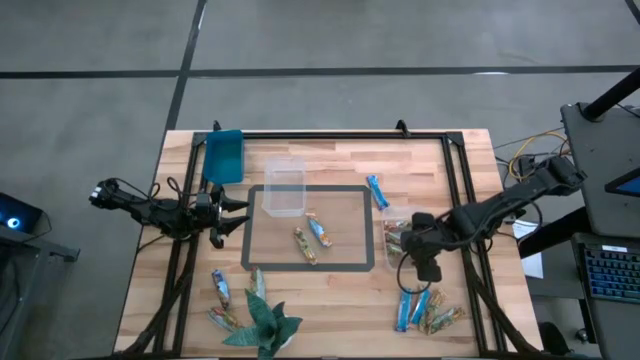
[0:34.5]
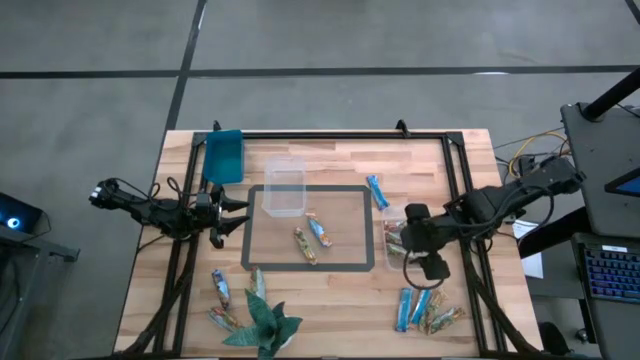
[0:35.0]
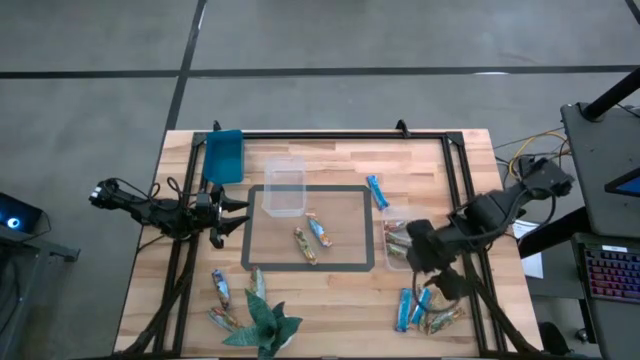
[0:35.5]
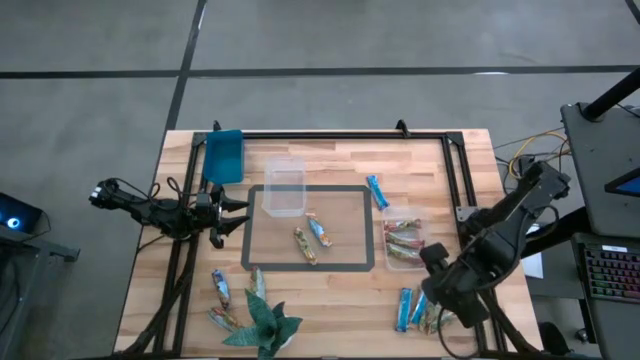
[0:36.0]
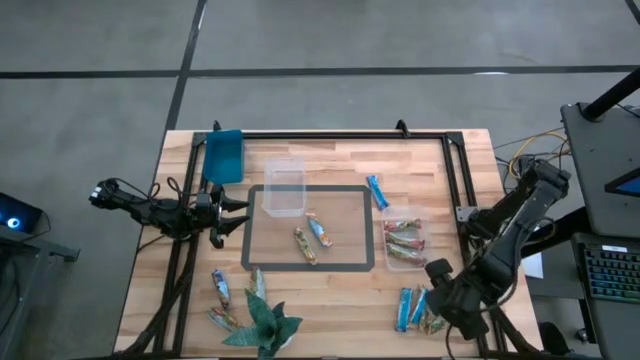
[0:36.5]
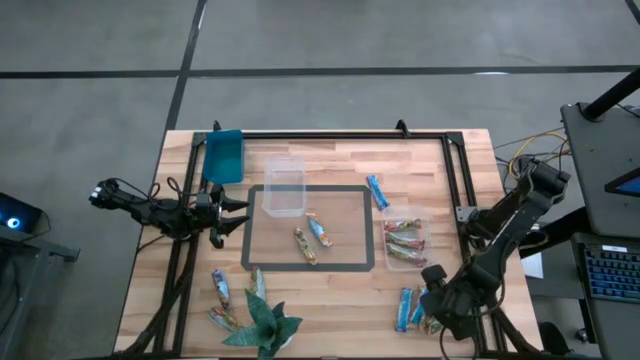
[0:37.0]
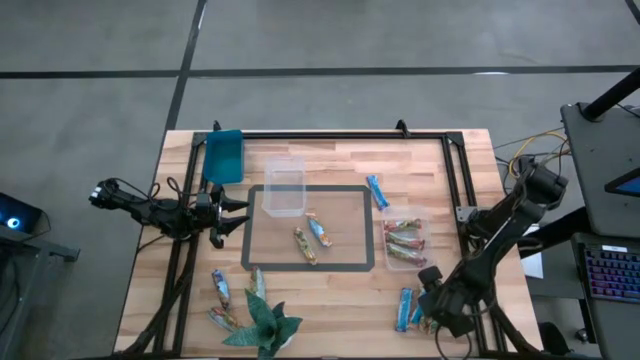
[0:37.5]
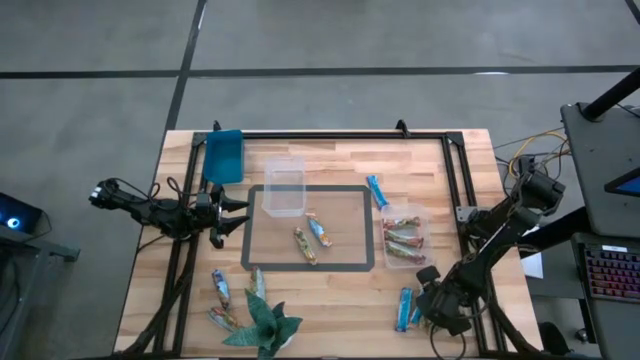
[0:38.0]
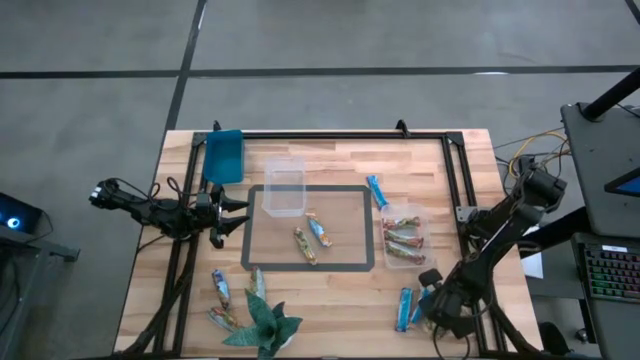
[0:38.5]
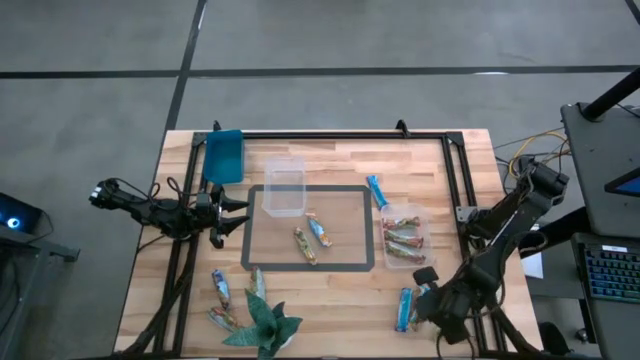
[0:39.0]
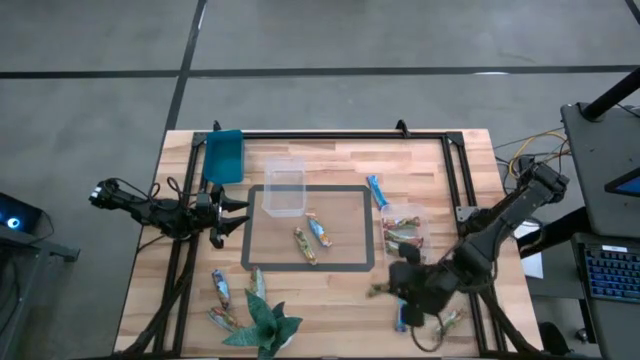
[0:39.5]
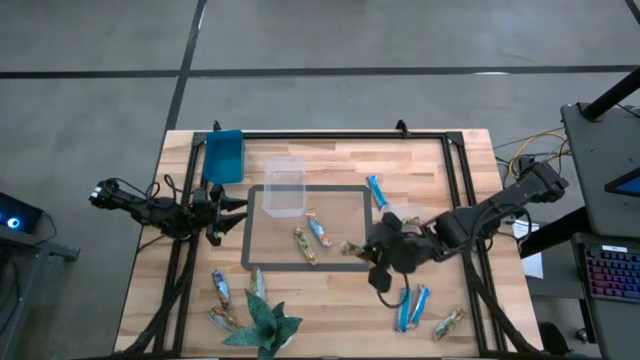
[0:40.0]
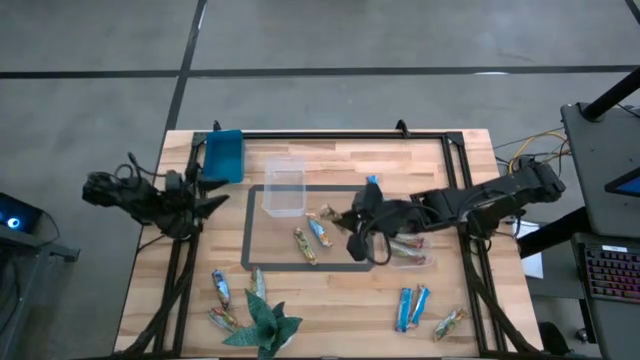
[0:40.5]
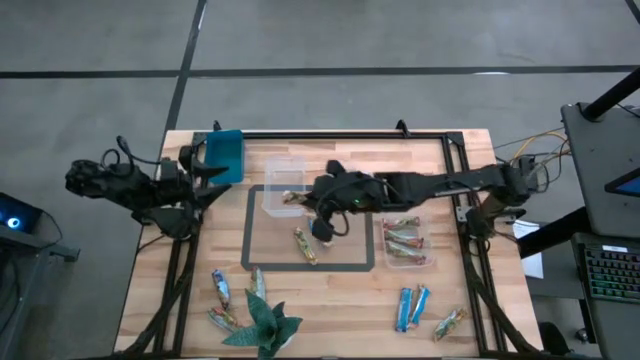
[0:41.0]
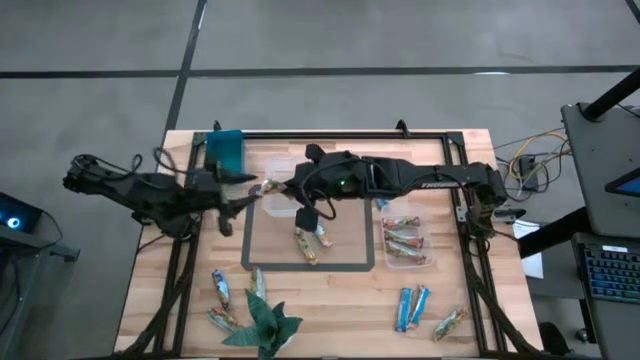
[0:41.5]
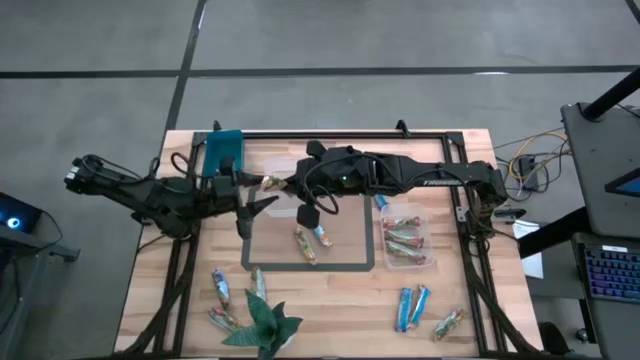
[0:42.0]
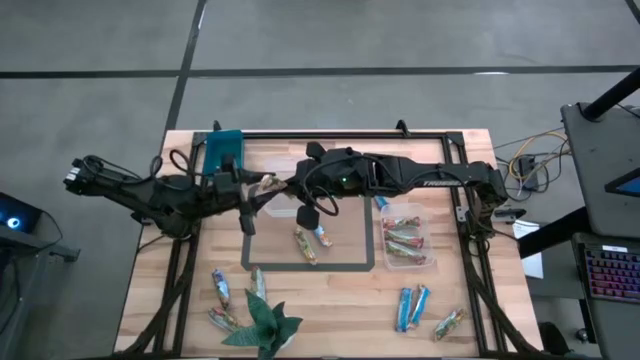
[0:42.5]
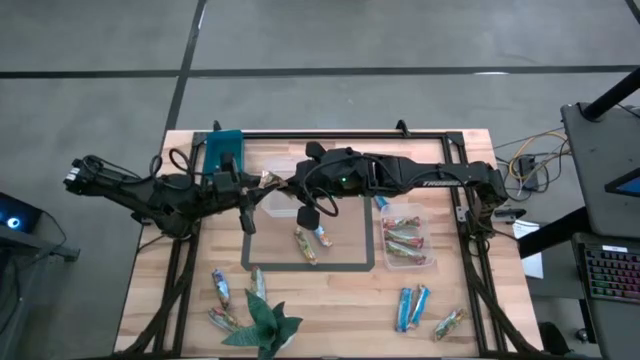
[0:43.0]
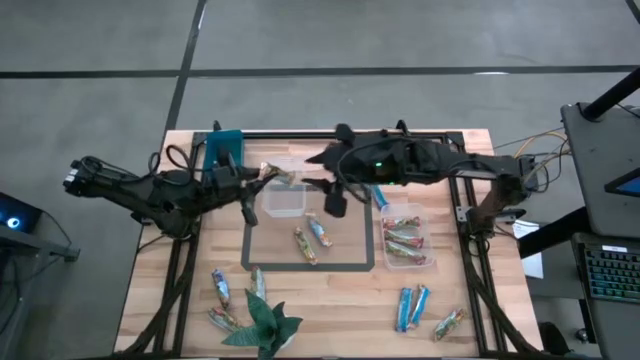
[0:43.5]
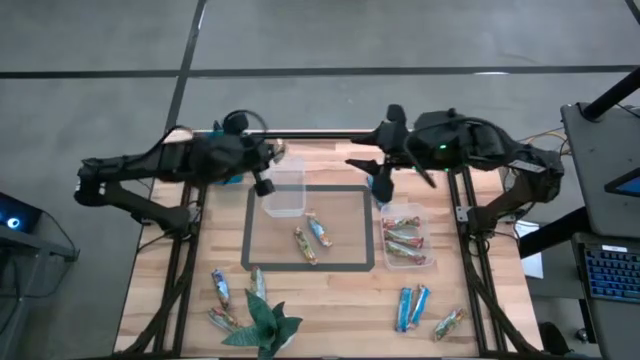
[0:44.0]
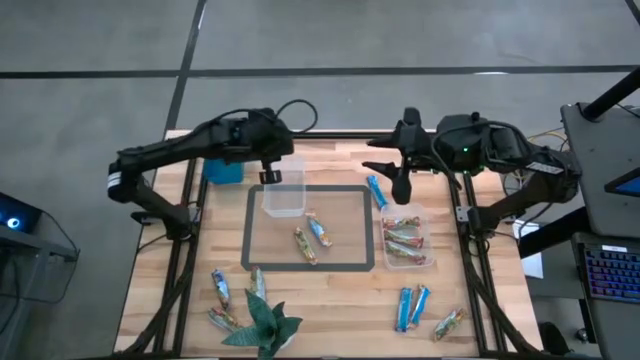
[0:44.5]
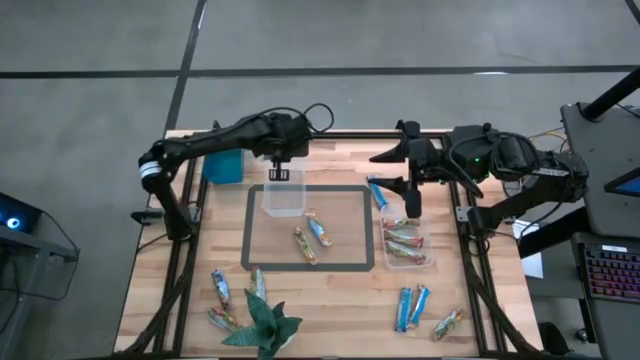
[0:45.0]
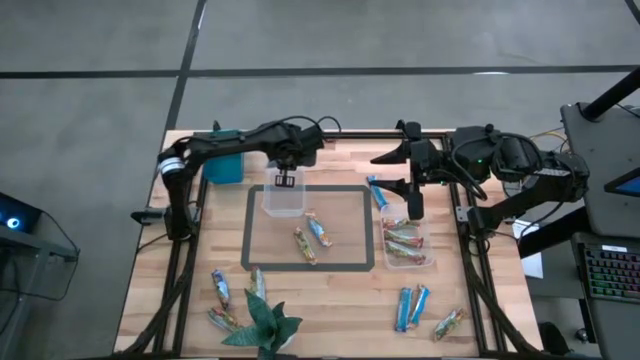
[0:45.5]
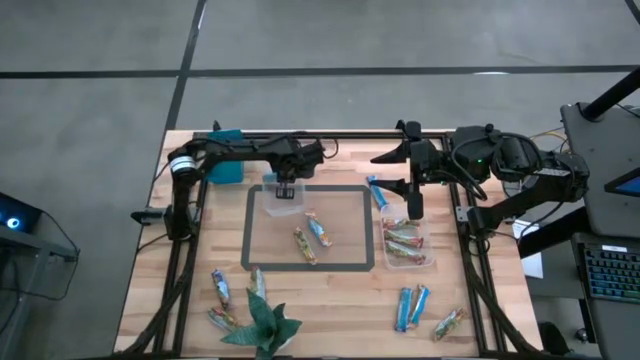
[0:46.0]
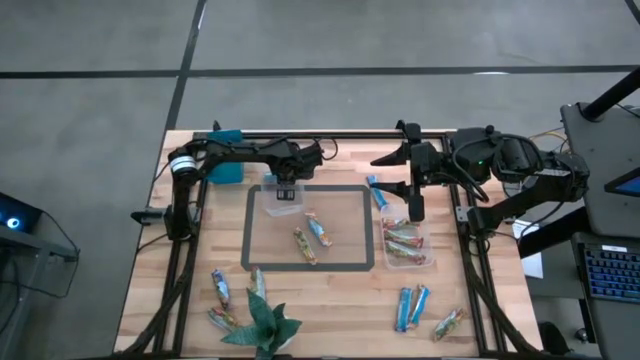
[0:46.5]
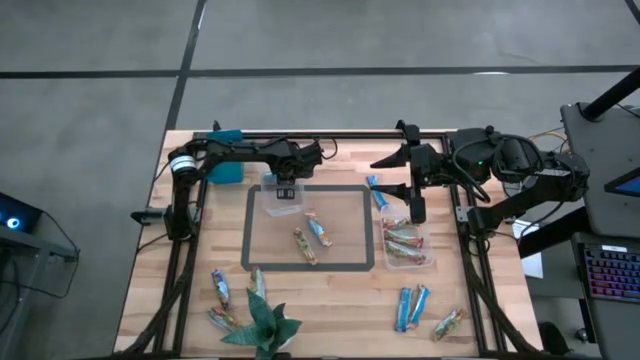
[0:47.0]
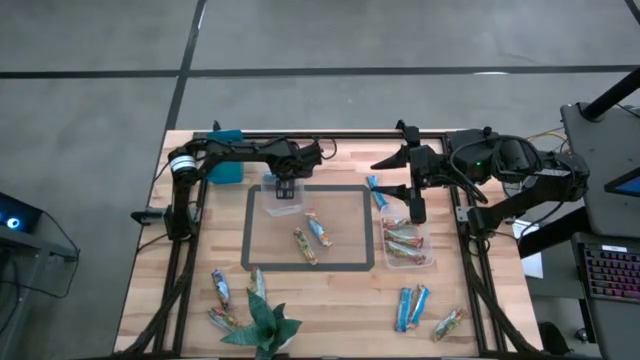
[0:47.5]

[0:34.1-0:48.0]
Task: Pick and place Granola Bars by type
Put the yellow granola bar into the left transparent bin

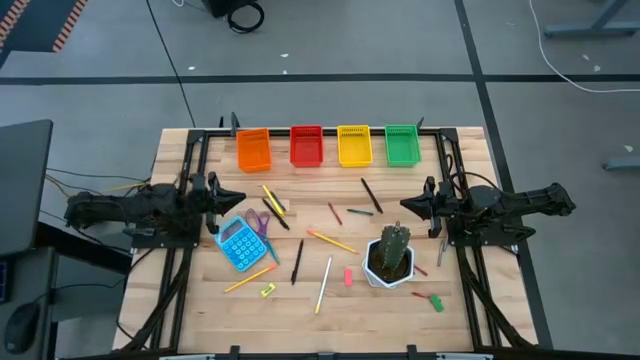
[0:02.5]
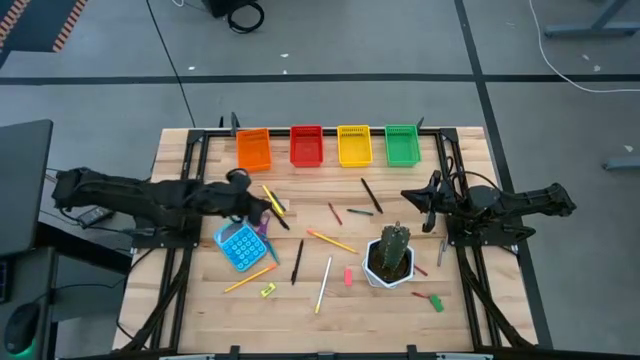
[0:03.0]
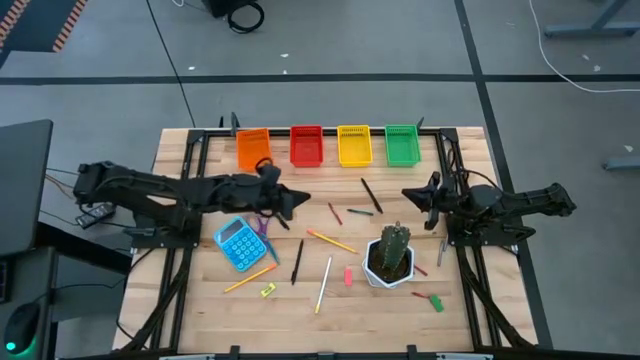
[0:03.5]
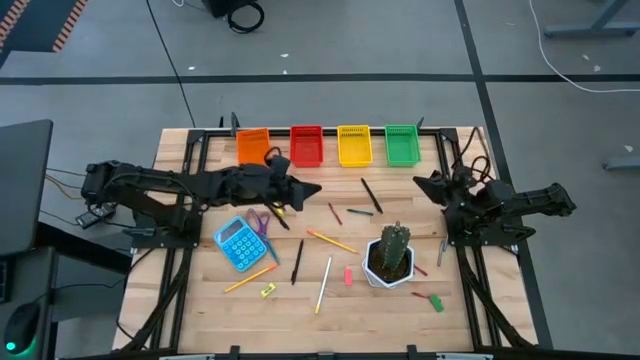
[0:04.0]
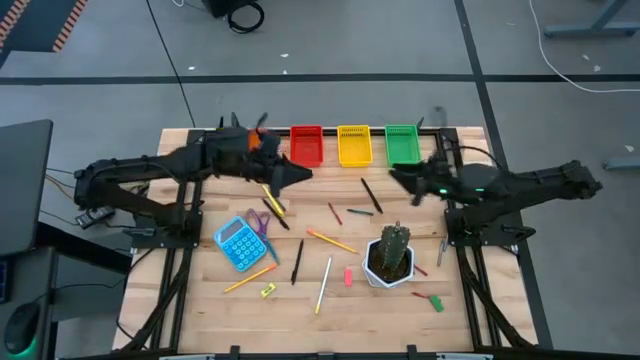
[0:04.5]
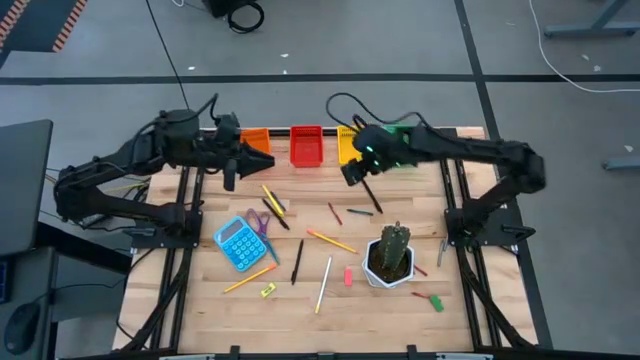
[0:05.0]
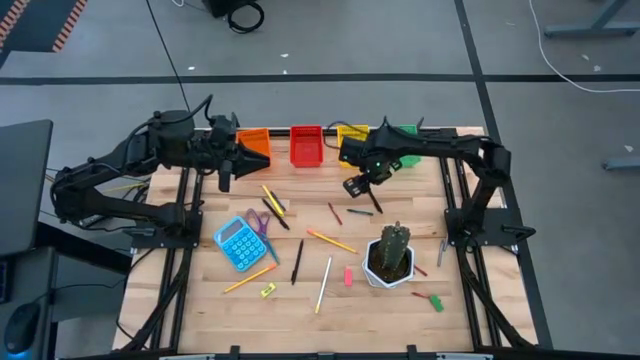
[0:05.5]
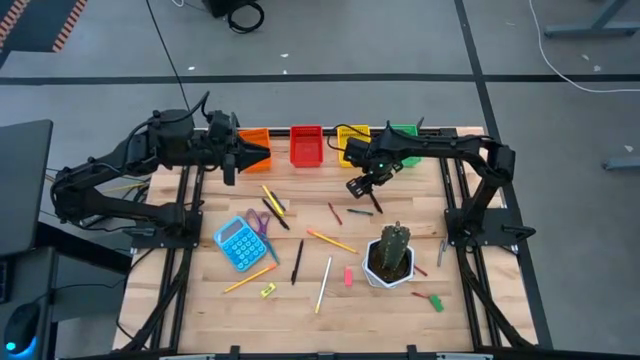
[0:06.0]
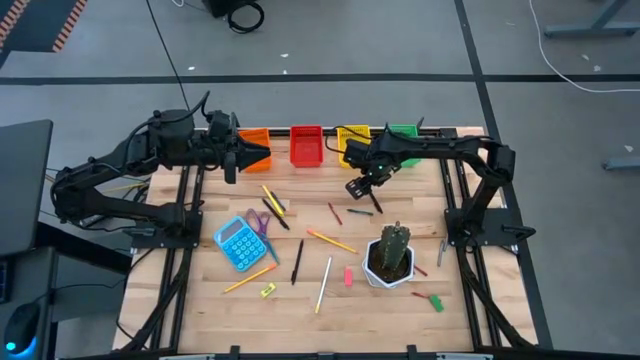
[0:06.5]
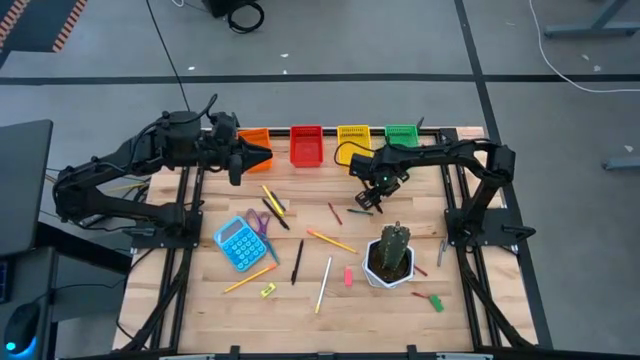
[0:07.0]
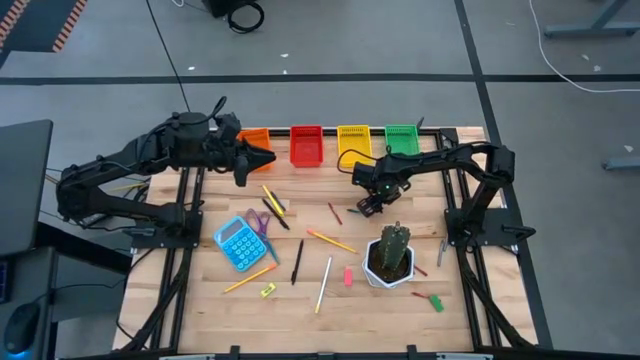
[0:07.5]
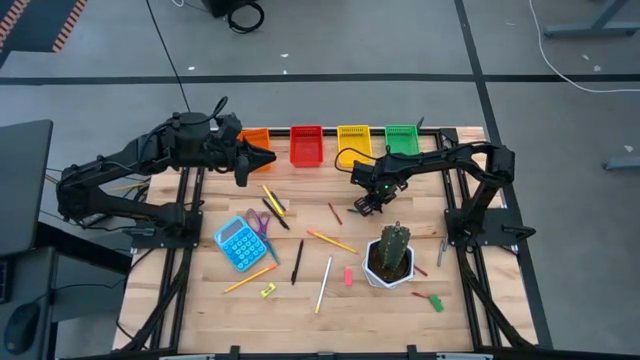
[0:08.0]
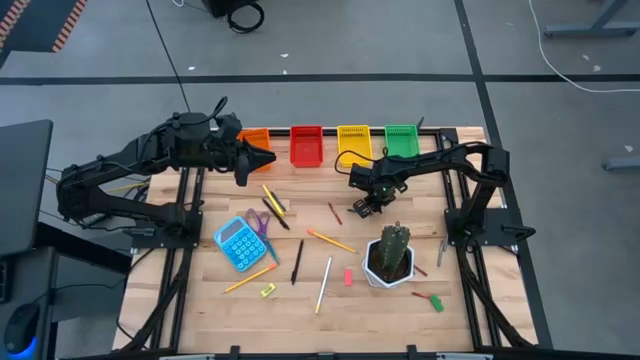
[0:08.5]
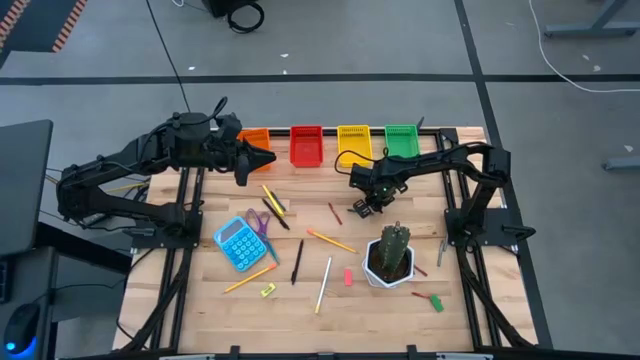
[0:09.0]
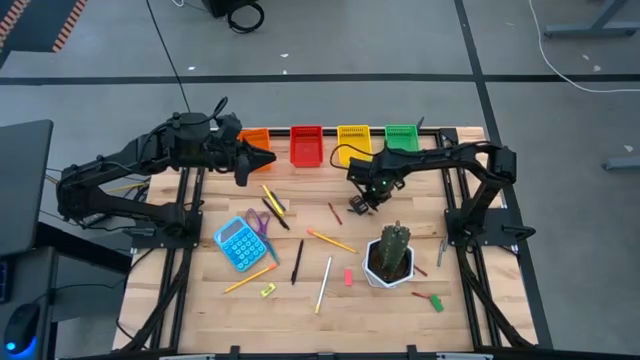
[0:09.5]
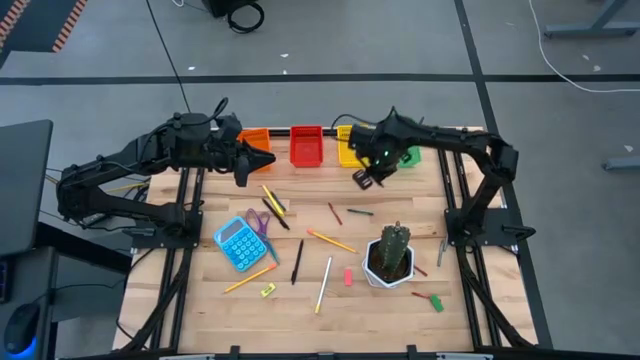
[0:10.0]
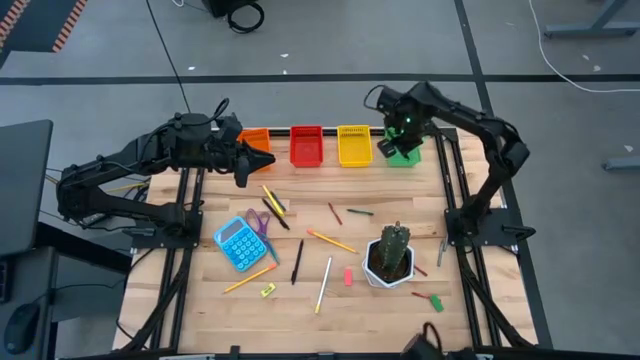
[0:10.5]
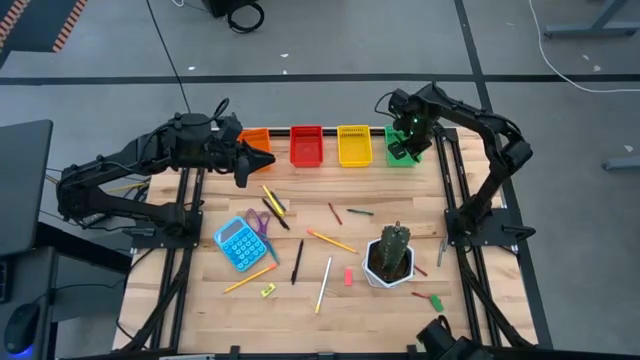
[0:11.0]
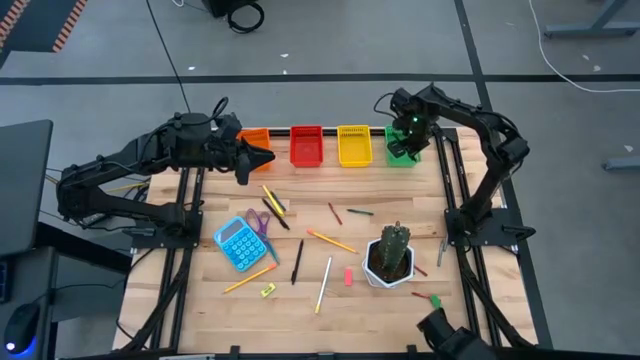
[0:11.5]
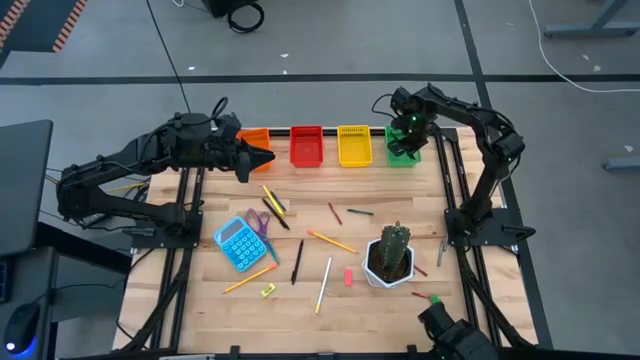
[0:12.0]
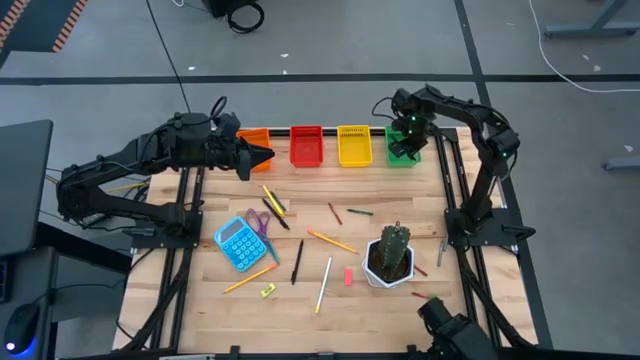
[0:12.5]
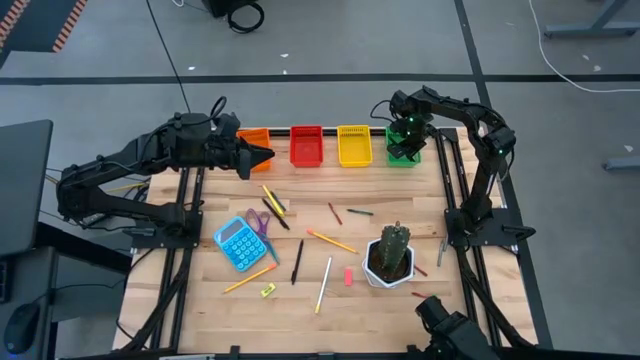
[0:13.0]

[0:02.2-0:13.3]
Task: Sort crayons/erasers/pens/pencils in bins
Put the top right black pen into the green bin
